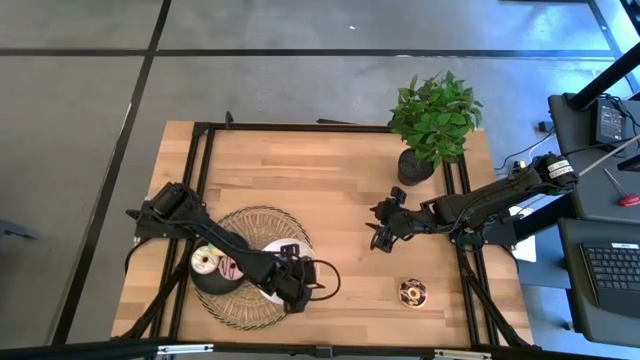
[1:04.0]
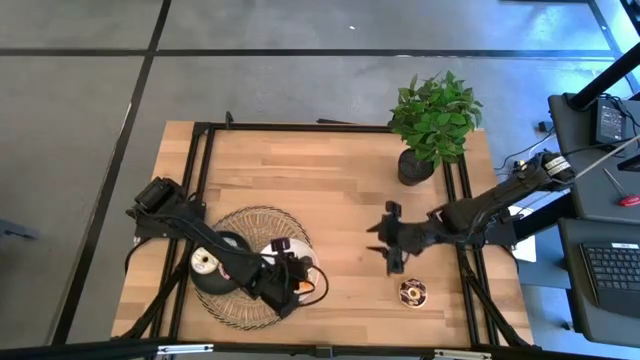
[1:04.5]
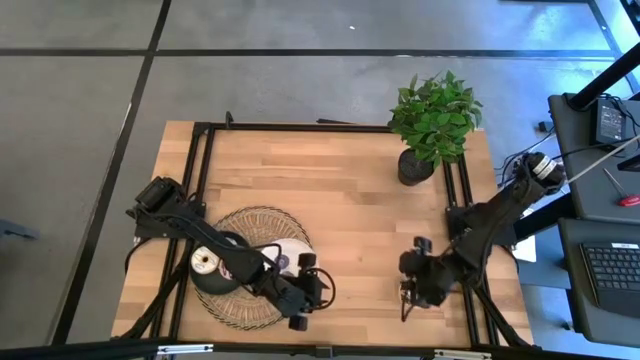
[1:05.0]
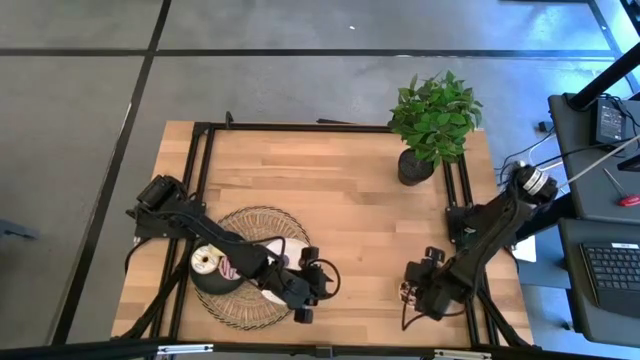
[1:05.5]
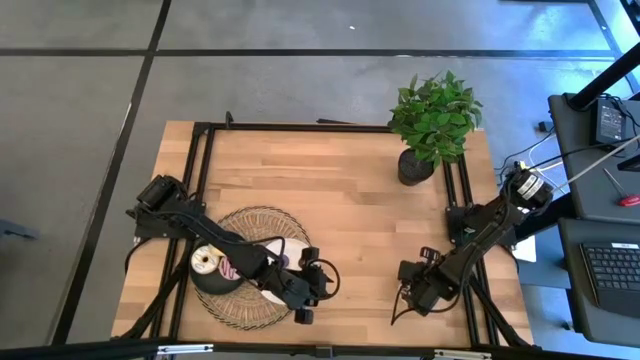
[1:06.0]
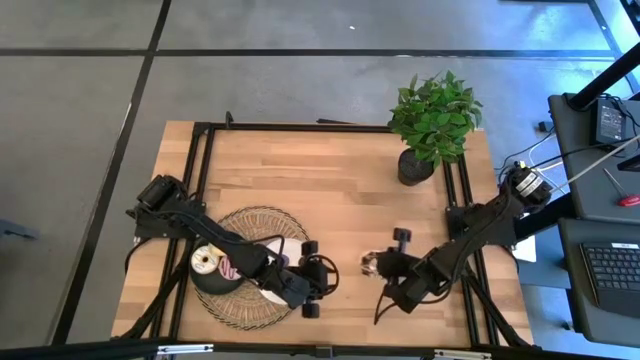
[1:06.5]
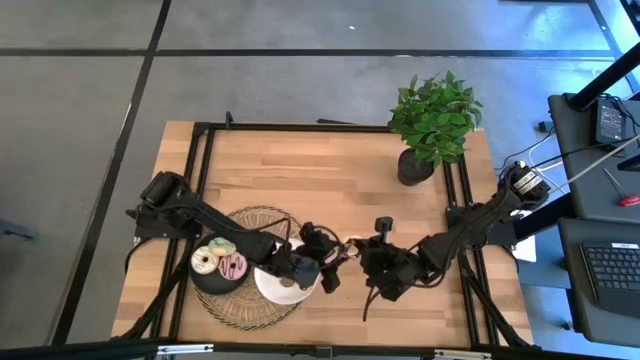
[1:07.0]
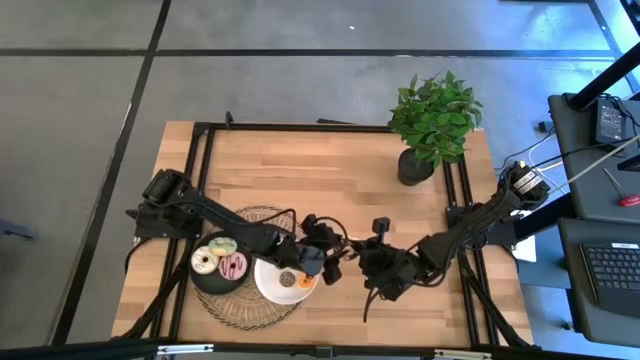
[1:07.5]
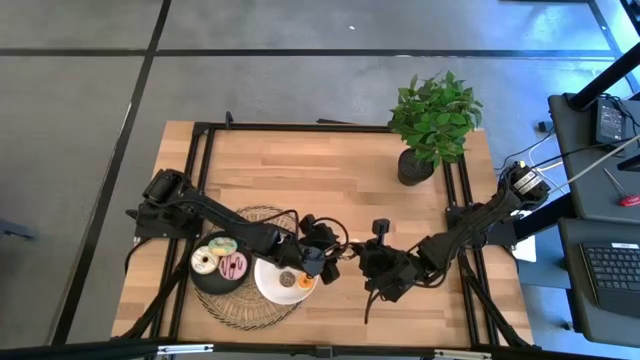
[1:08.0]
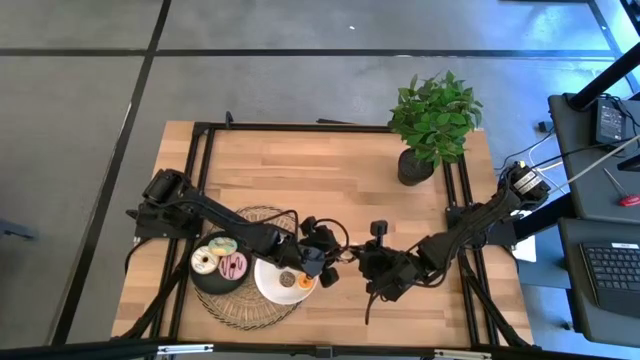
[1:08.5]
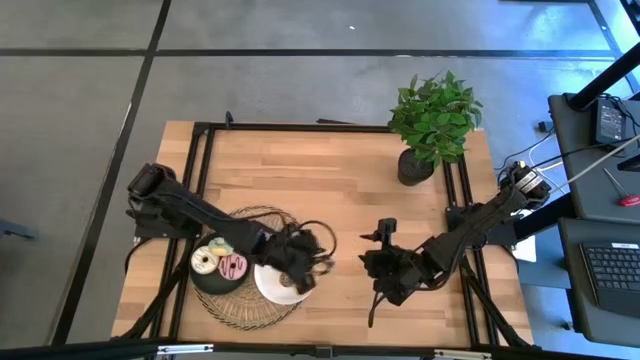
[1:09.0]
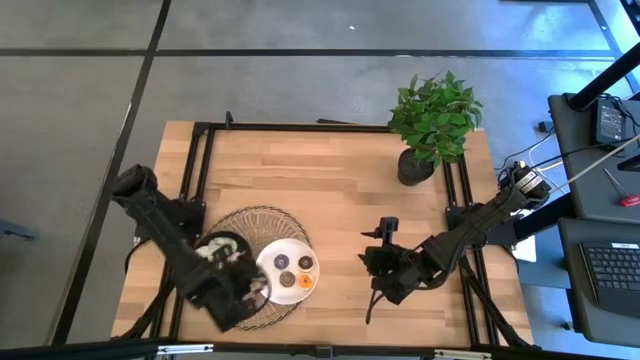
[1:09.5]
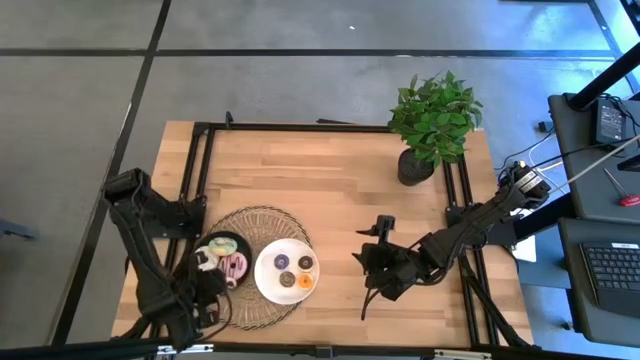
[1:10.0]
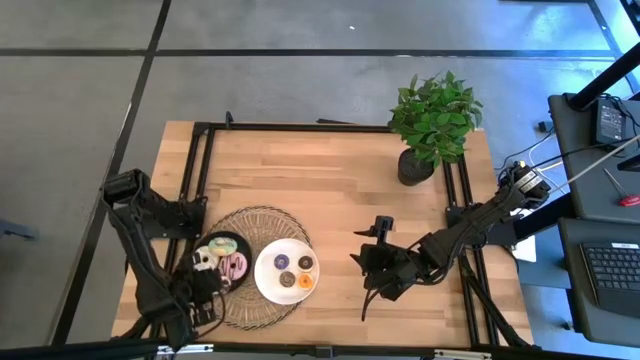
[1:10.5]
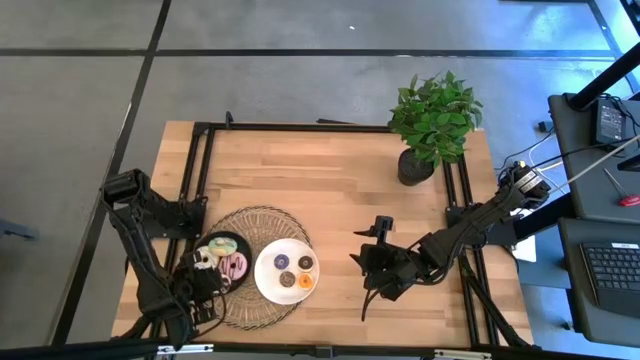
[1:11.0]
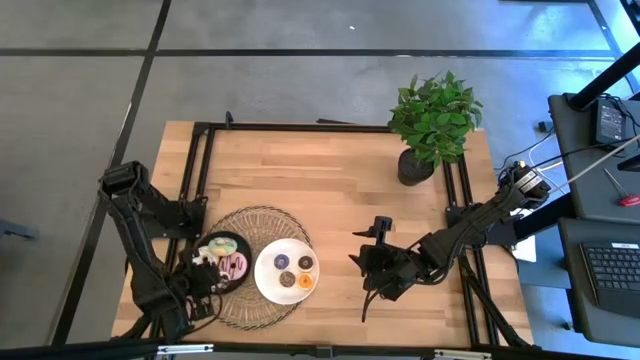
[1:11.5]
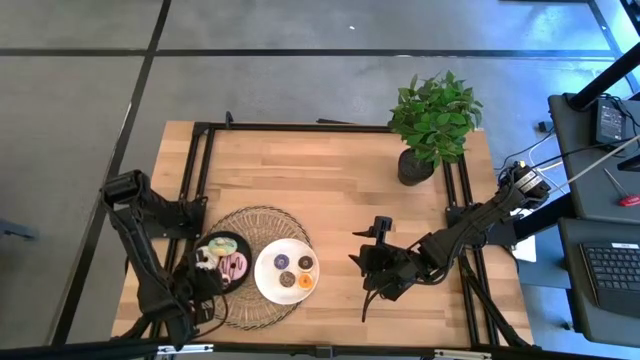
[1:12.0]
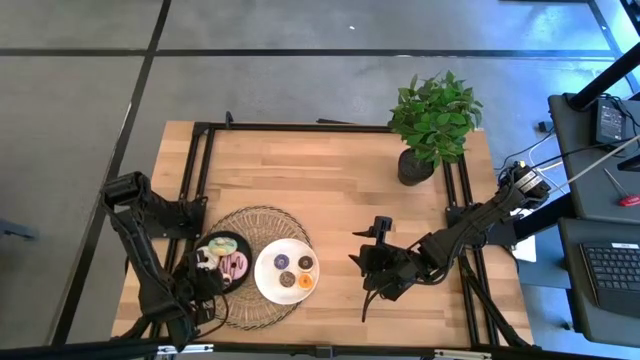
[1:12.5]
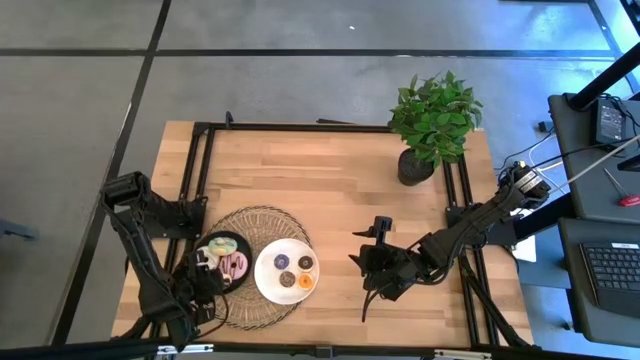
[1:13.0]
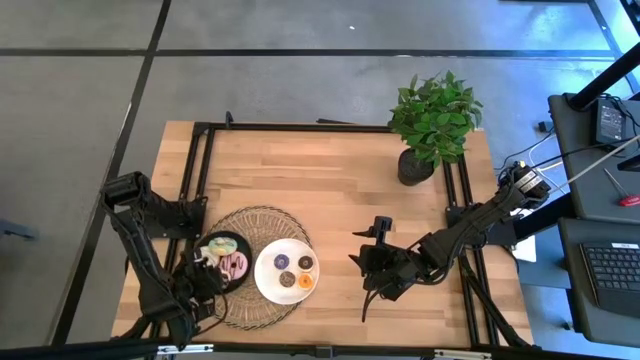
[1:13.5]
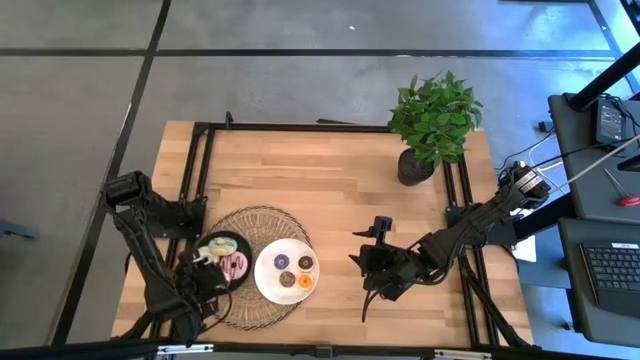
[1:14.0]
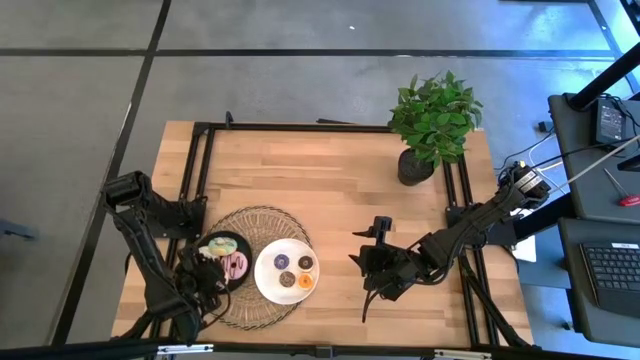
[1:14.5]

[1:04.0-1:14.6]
Task: Pick & Place donuts
Put the large black donut on the black plate

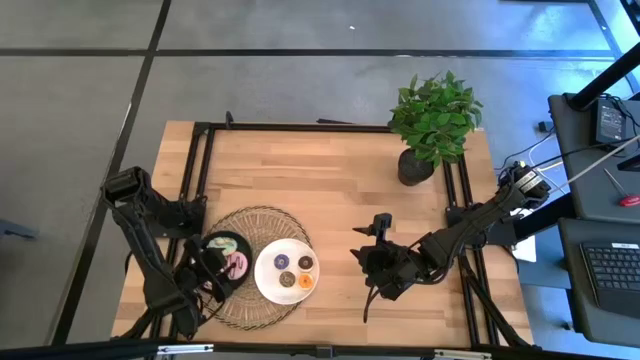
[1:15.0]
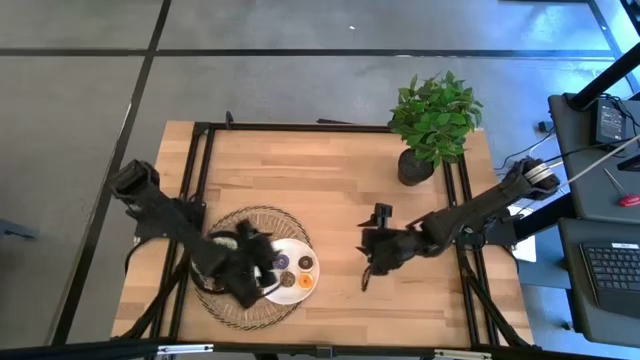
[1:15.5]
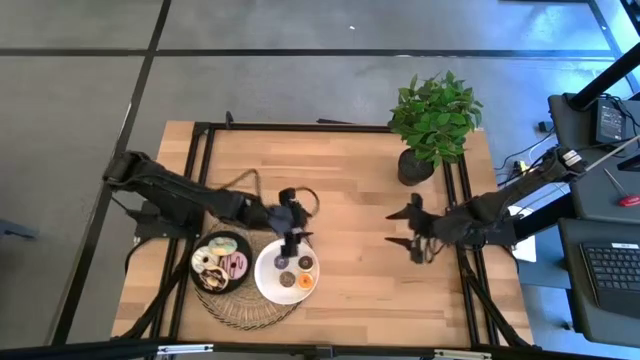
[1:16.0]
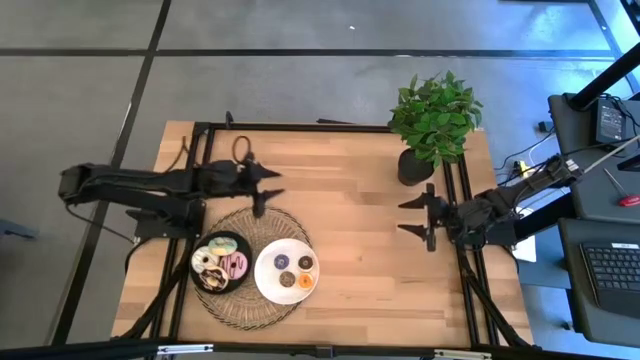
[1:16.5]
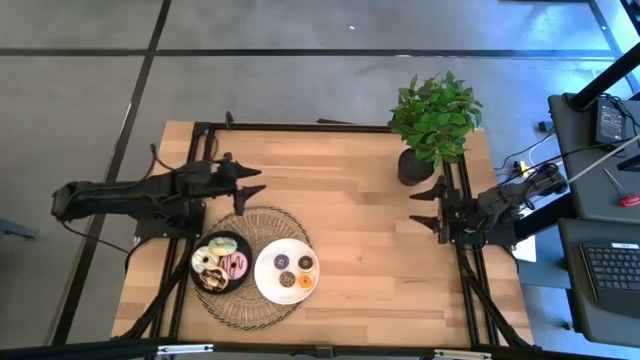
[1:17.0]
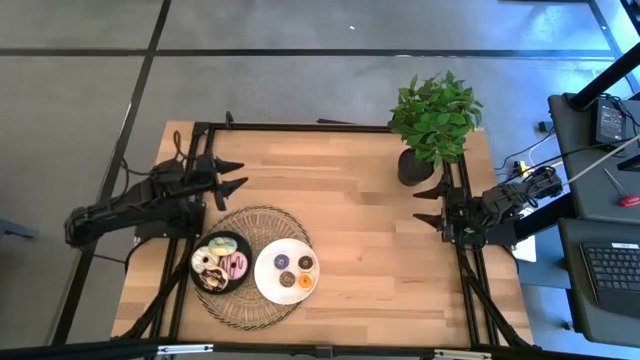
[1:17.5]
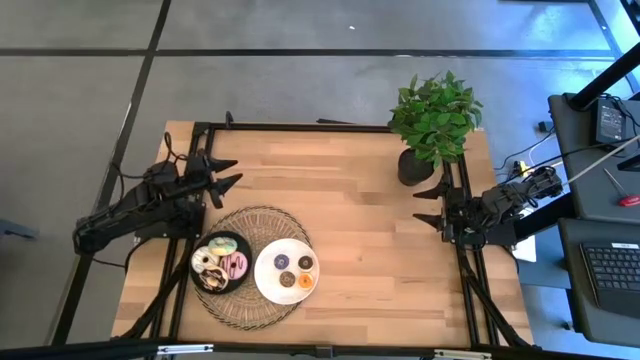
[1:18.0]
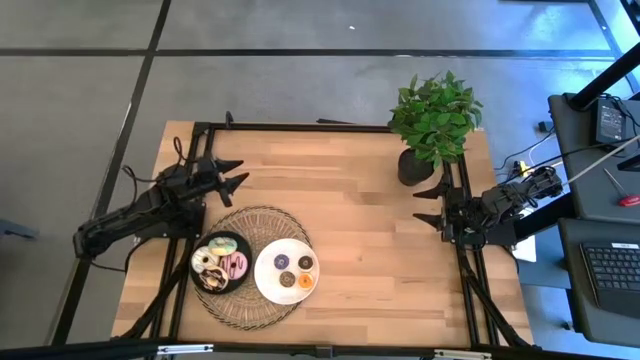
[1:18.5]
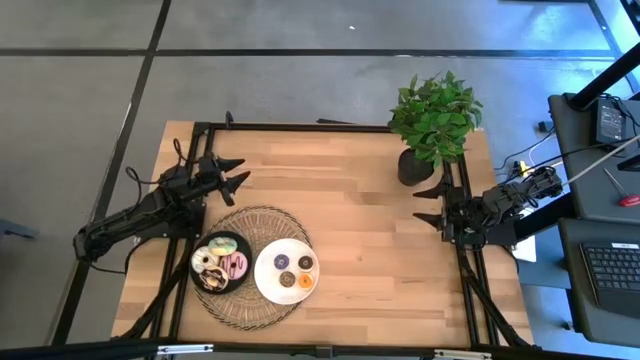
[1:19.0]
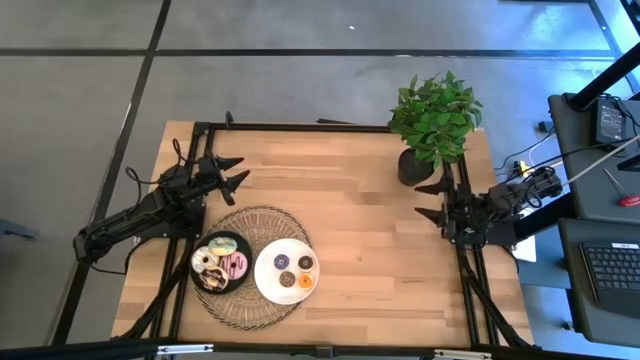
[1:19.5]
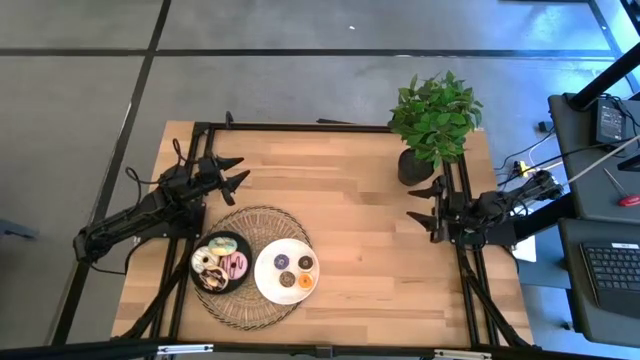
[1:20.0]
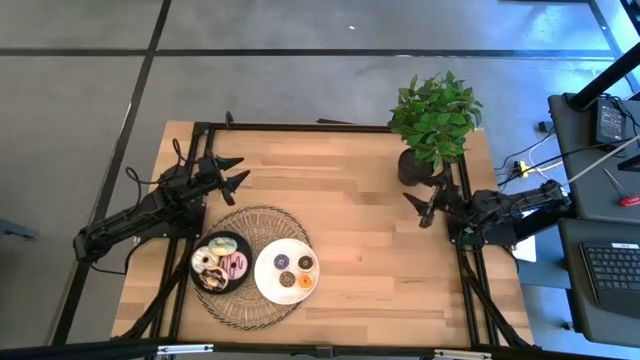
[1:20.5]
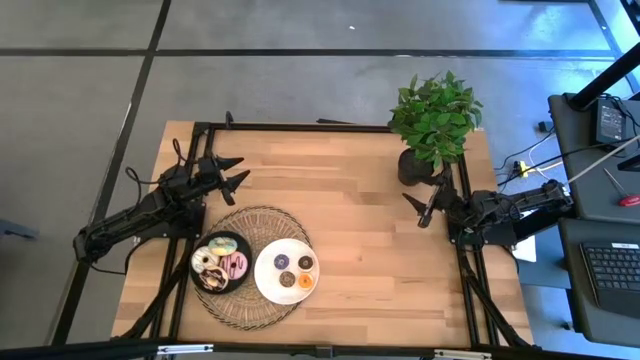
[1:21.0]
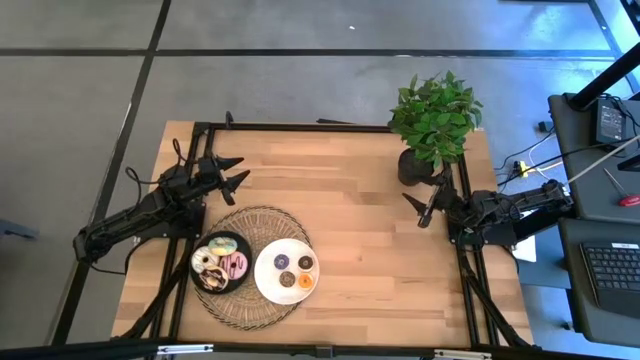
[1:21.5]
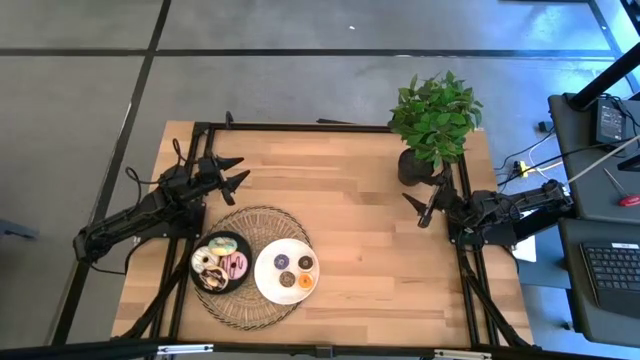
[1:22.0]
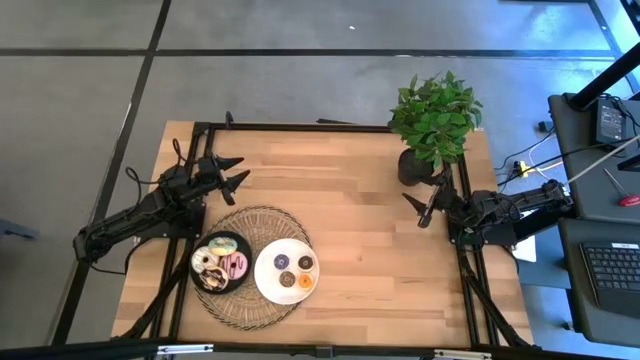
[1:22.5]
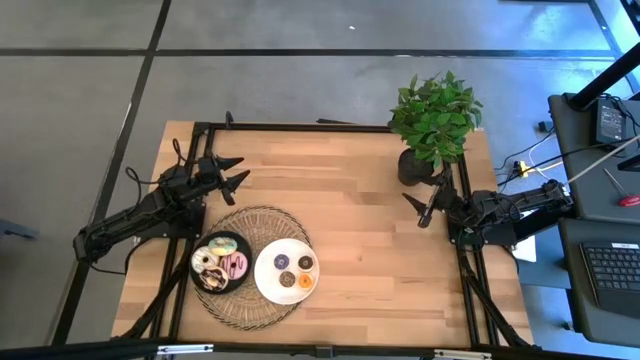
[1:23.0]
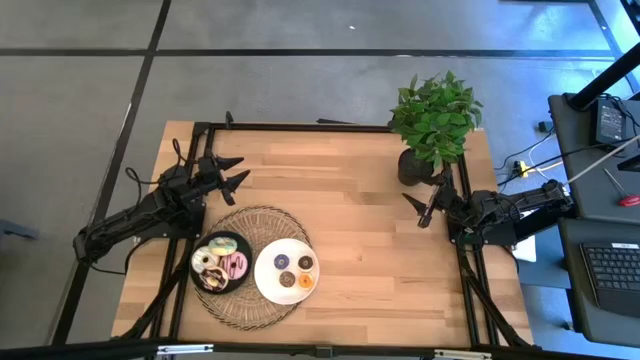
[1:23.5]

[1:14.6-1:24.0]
Return to Home Position

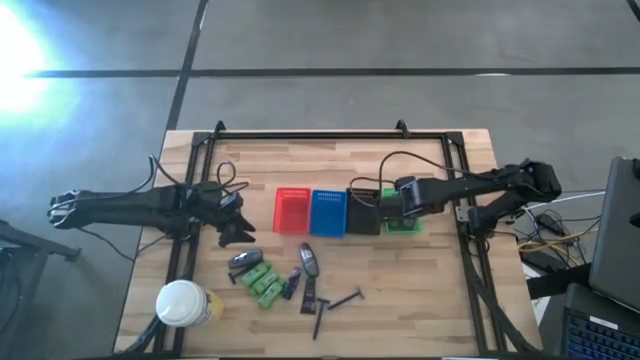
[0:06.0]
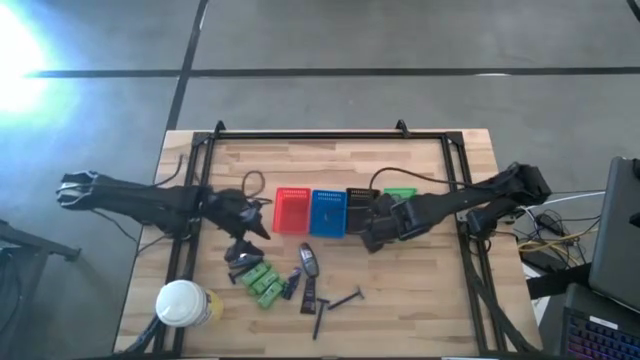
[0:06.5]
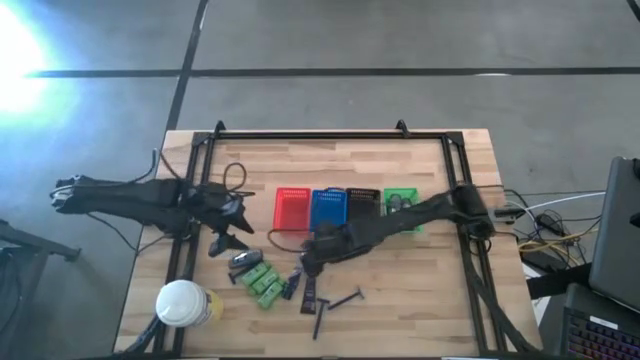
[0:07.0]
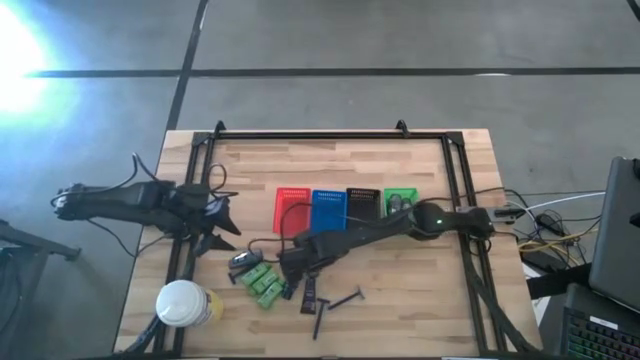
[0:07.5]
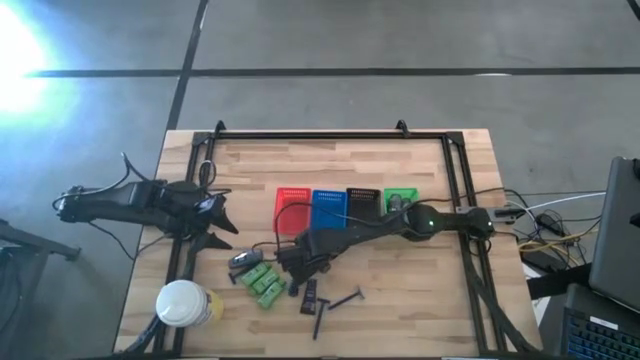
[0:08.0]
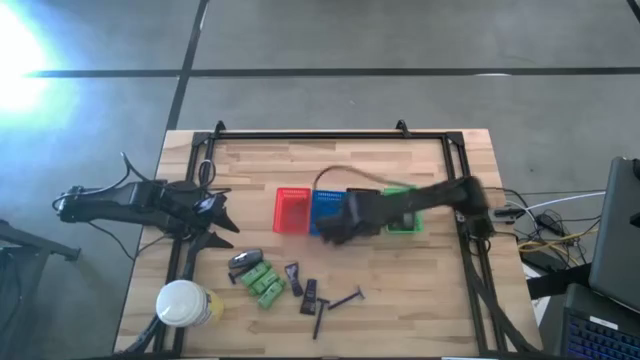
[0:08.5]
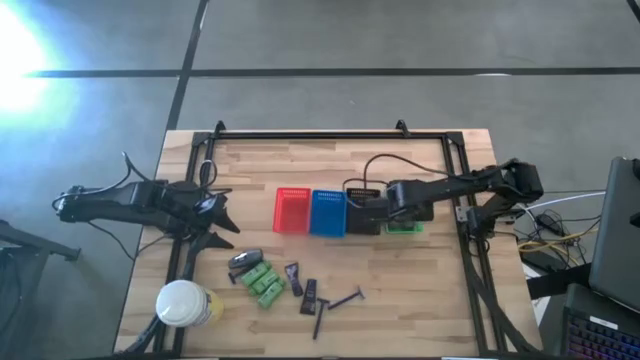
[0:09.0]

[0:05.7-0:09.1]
Task: Pick & Place Travel size toiletries
Put the black deodorant into the green bin
